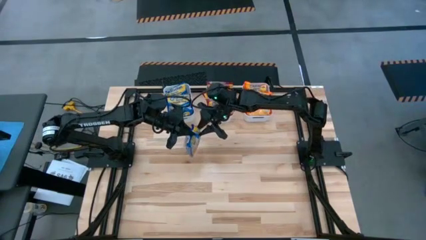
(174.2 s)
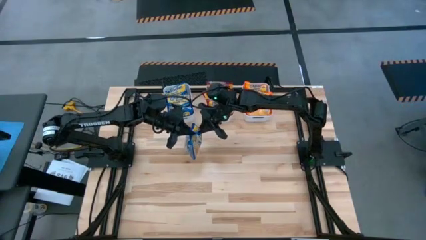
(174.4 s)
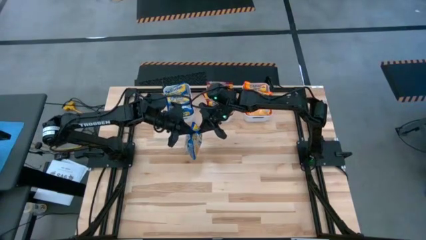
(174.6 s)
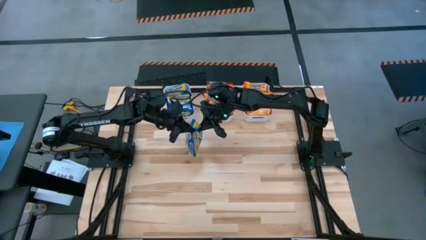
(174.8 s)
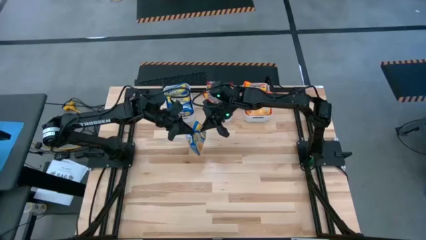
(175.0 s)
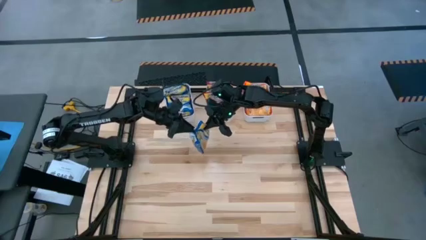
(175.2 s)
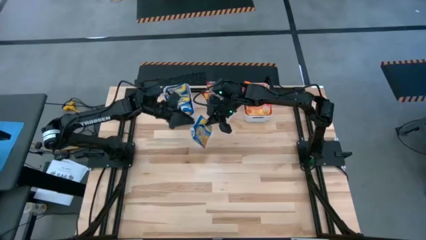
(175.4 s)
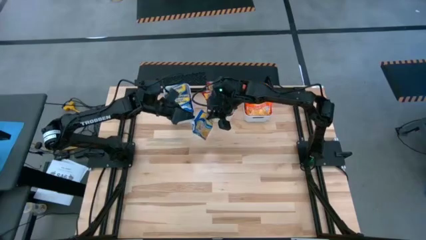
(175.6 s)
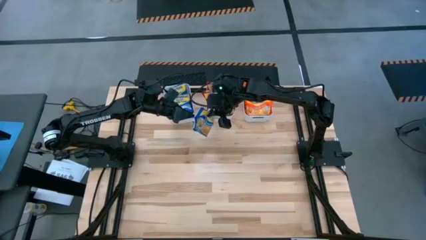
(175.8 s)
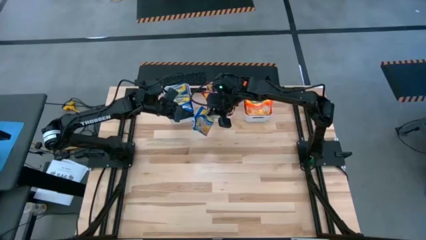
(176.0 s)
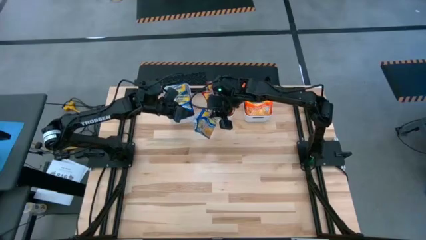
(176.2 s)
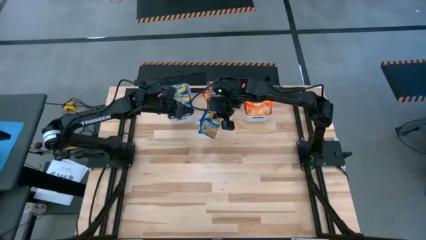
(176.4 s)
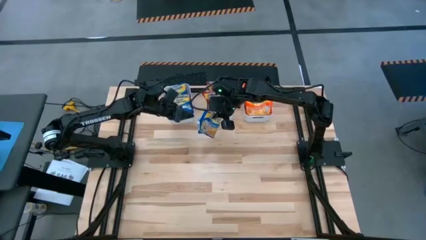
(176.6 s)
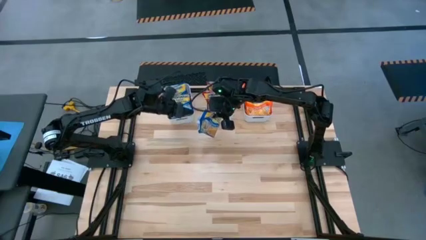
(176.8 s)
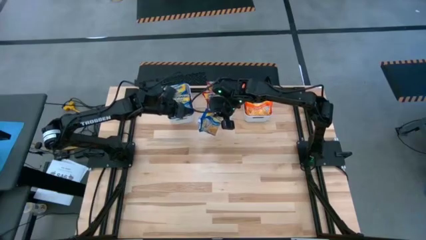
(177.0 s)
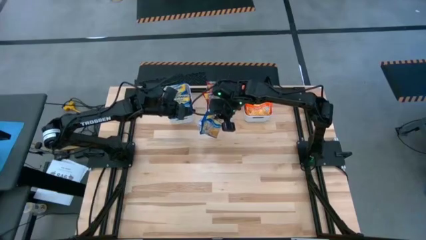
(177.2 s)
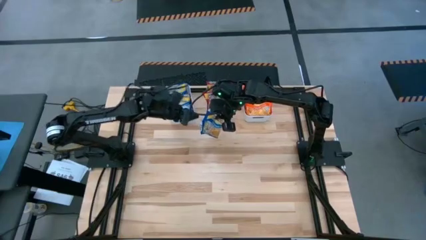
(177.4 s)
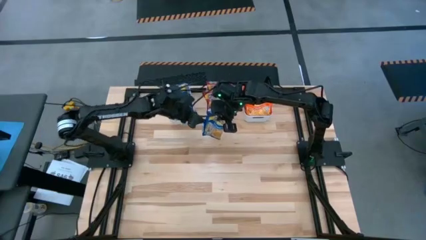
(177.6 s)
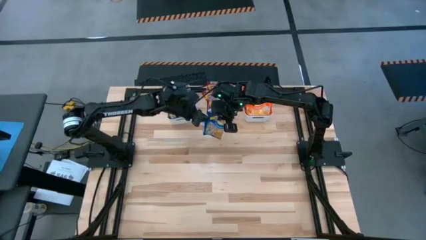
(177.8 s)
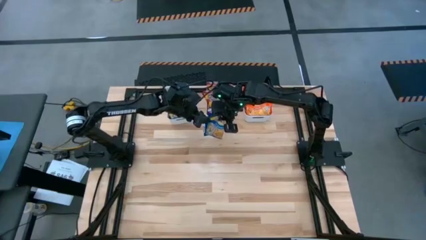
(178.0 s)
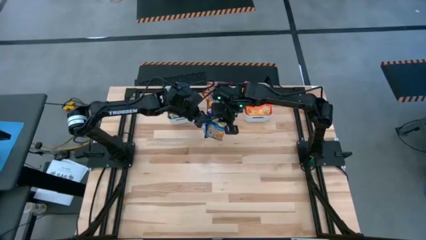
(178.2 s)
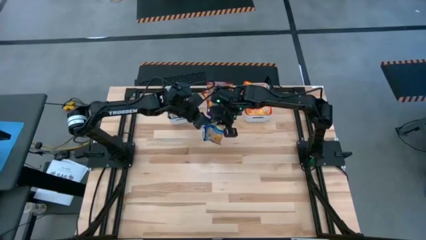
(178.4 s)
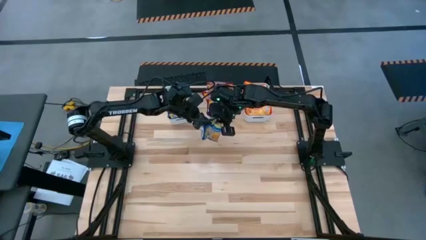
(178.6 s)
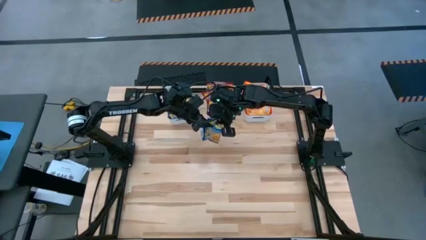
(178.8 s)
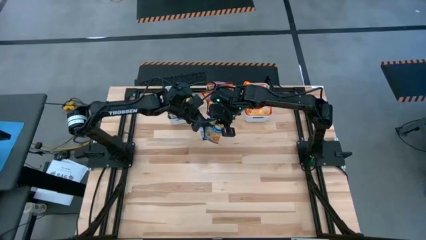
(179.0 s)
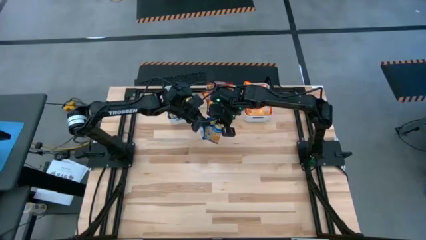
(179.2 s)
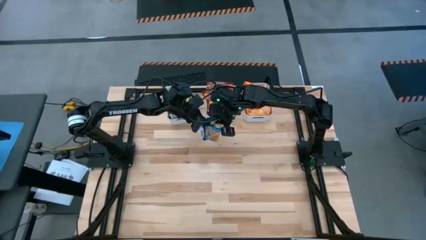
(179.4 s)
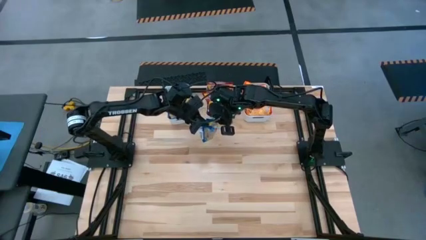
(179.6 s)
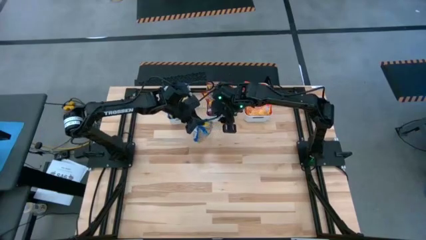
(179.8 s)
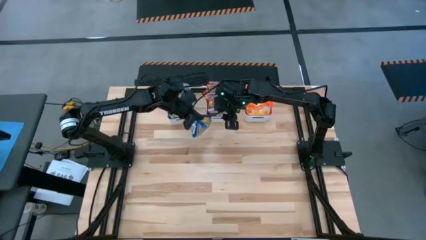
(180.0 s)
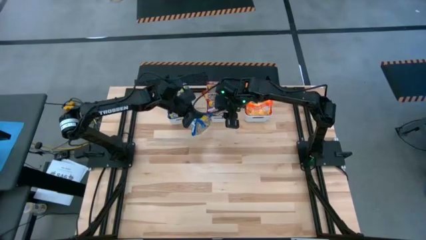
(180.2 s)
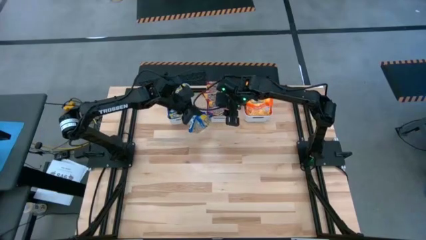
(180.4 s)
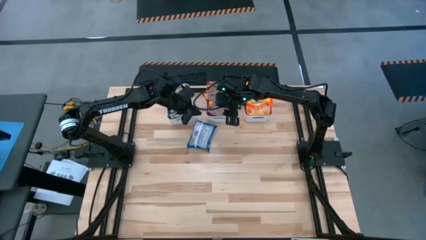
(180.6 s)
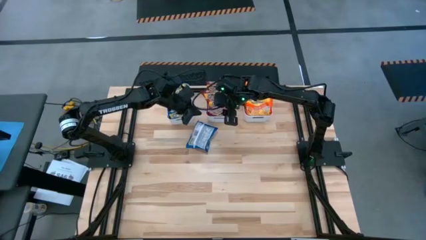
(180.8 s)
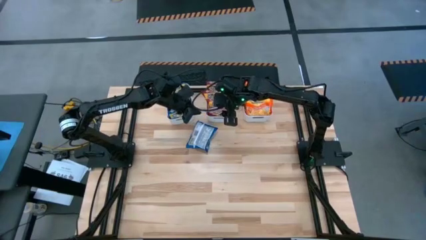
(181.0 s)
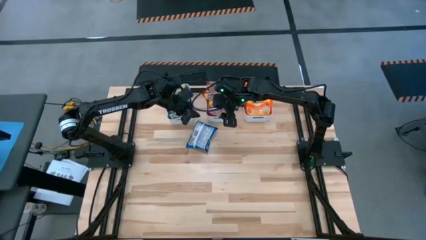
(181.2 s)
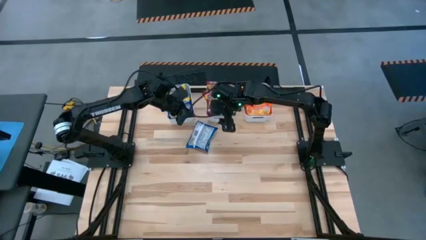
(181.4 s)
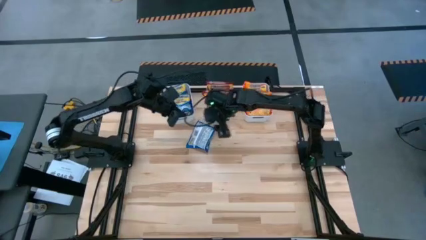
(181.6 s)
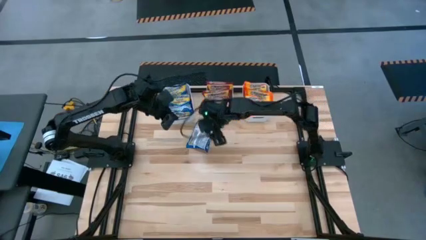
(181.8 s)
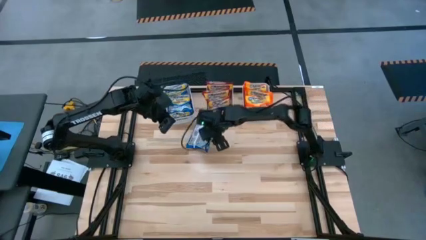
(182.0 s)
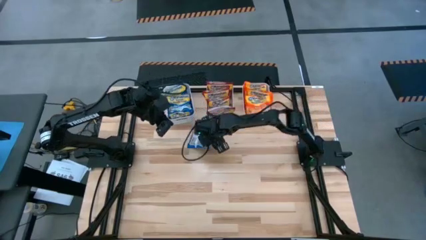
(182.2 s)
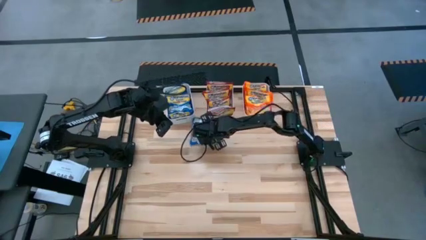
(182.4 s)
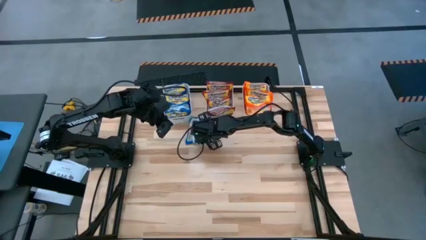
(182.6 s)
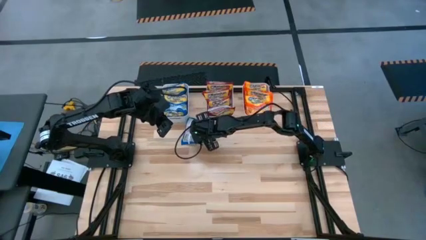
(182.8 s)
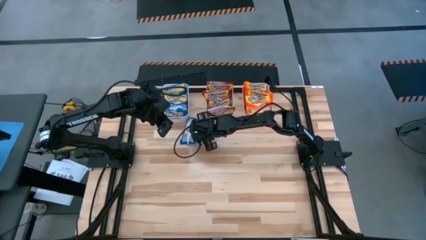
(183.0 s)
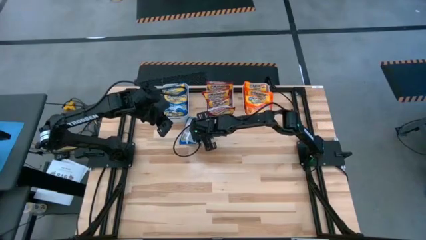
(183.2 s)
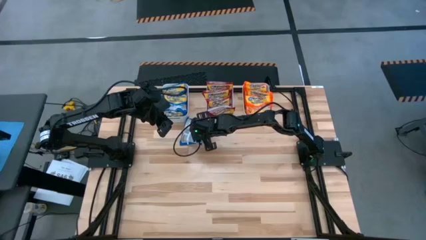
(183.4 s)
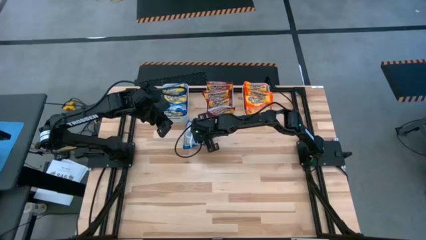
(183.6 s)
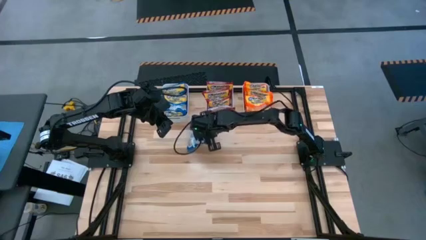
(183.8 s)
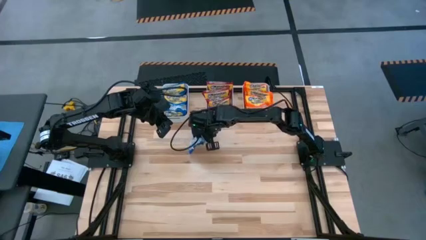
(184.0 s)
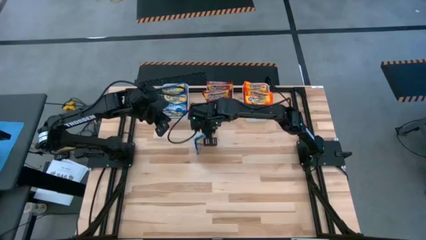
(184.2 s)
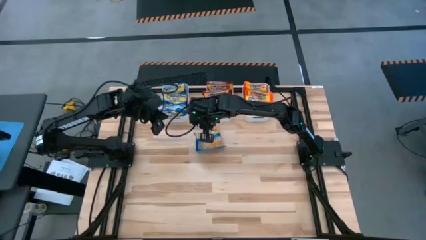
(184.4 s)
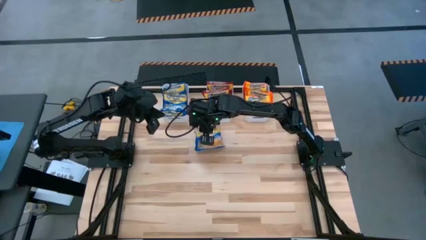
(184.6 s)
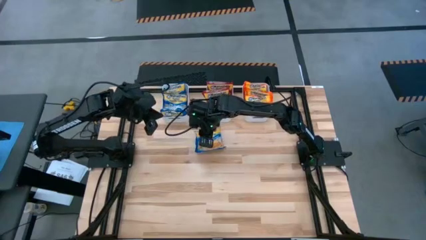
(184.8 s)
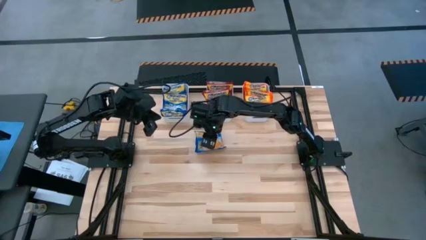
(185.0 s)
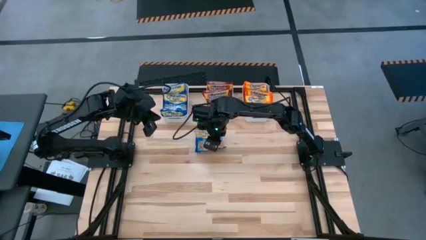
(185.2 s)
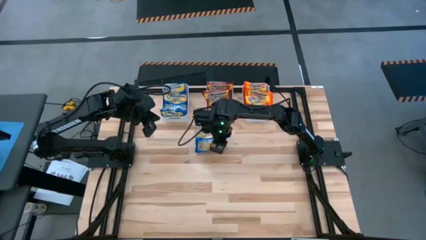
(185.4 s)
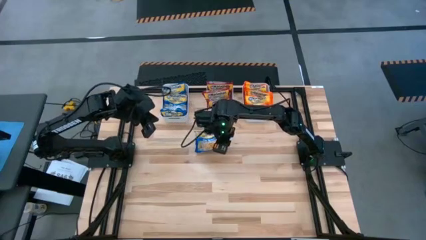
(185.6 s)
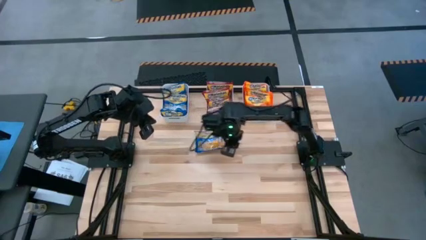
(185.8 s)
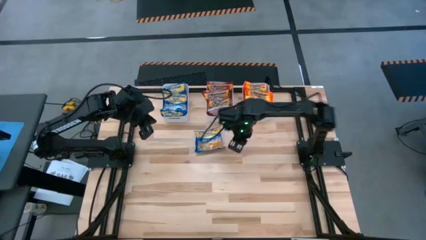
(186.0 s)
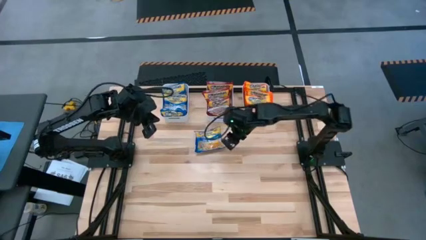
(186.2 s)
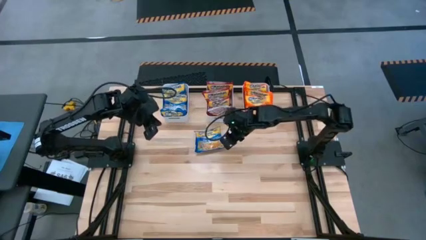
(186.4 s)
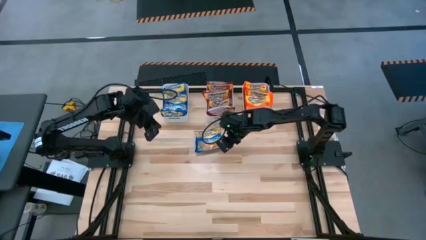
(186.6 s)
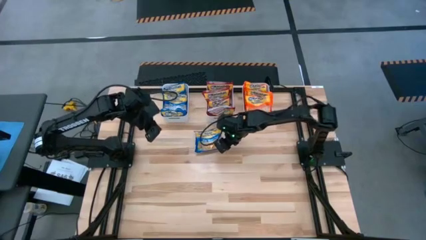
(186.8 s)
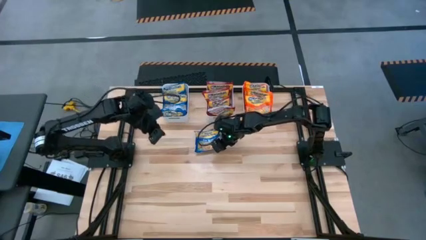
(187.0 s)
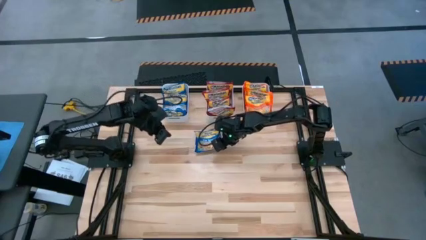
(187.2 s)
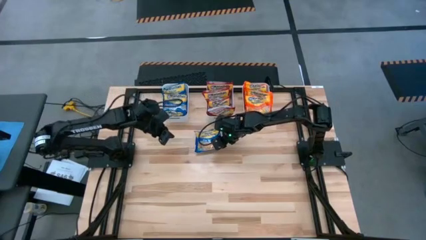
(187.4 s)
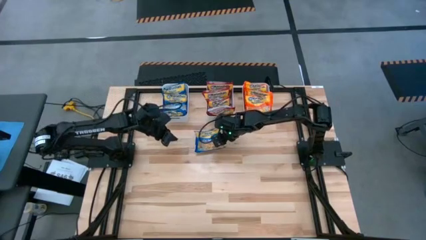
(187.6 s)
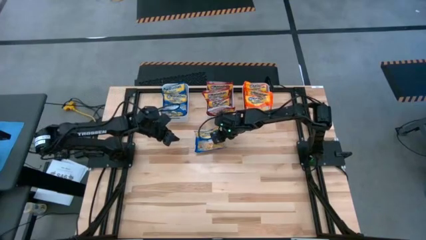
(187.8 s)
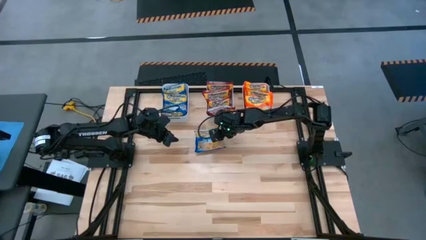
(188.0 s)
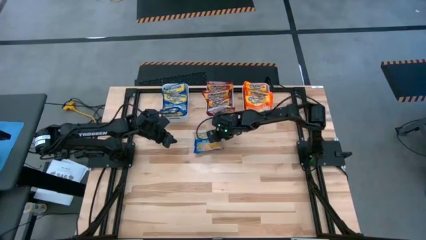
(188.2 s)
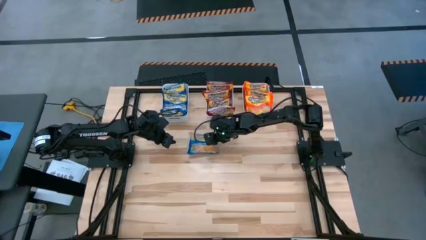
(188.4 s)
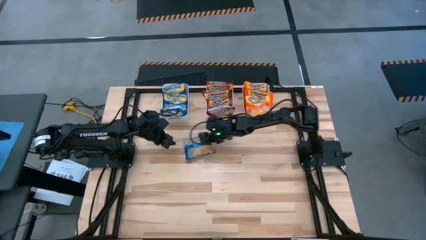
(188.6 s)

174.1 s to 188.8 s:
Task: Sort Maruchan noodles
Put the blue noodle pack into the left white bin
